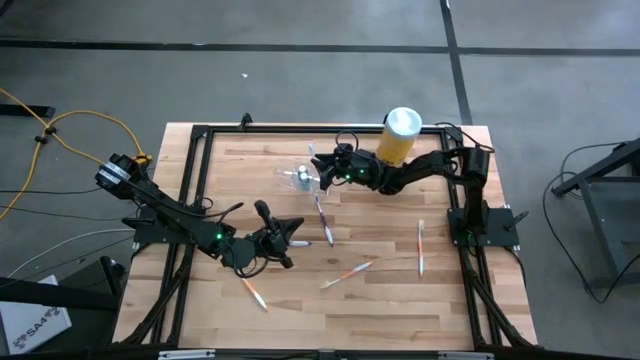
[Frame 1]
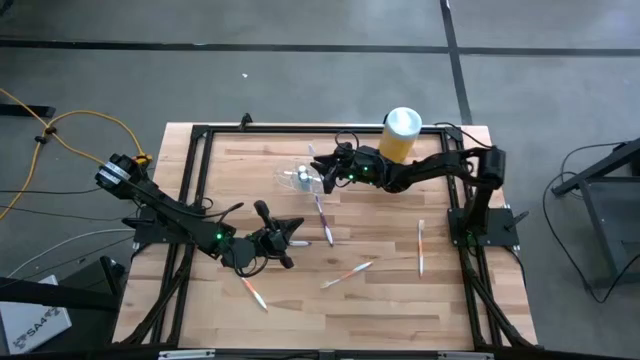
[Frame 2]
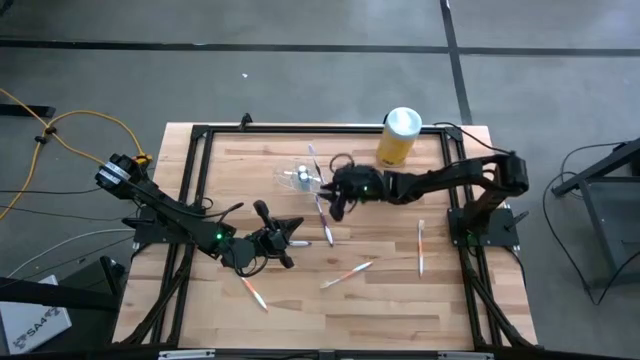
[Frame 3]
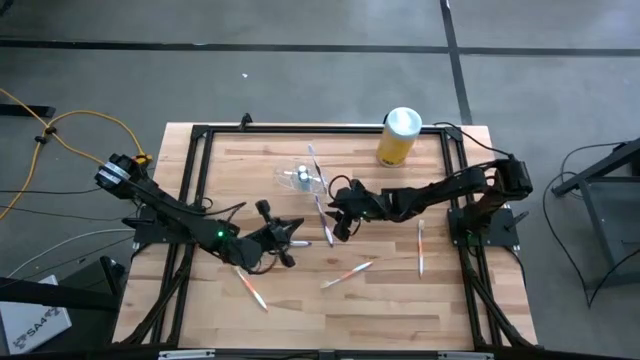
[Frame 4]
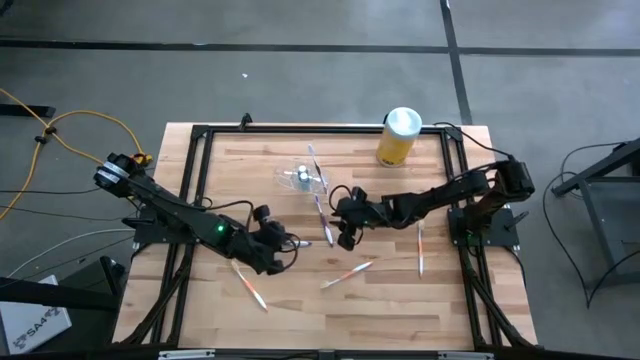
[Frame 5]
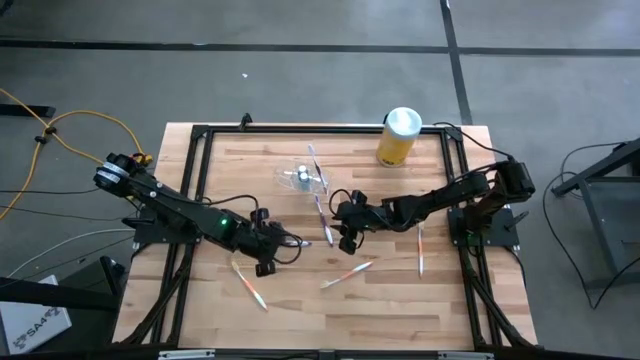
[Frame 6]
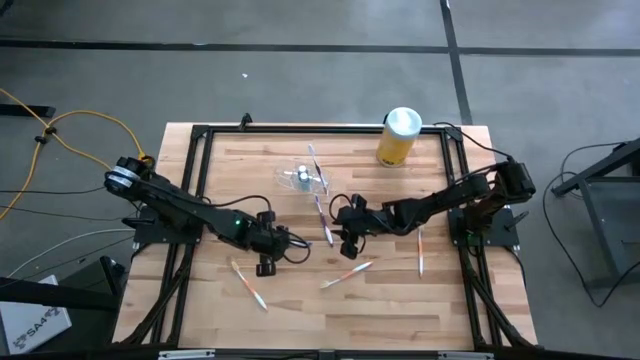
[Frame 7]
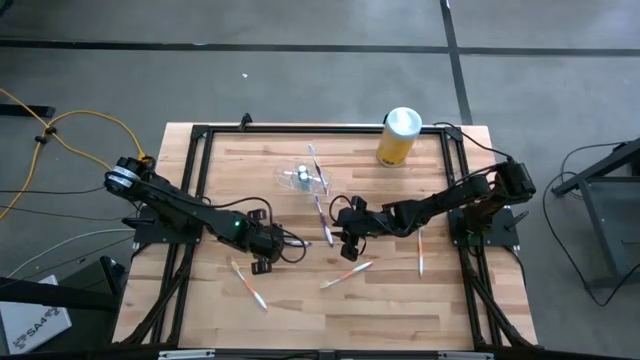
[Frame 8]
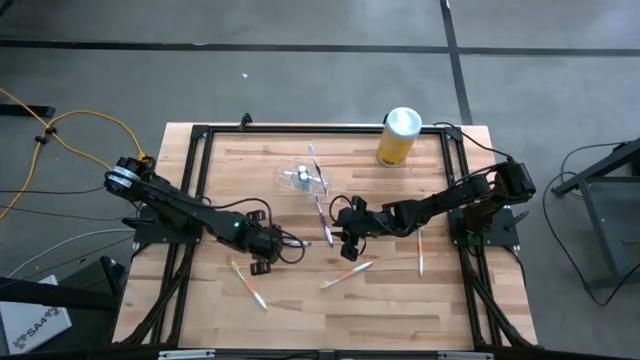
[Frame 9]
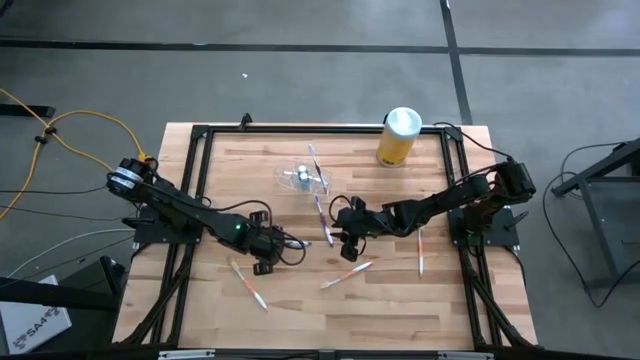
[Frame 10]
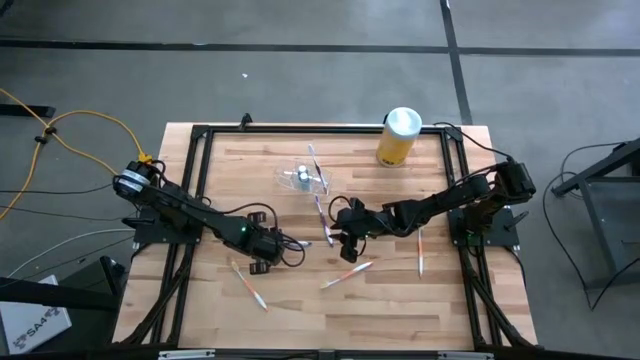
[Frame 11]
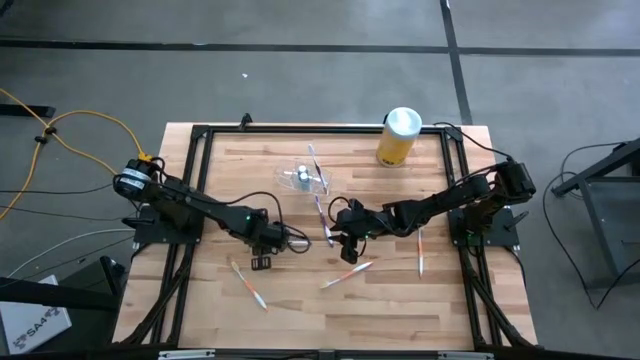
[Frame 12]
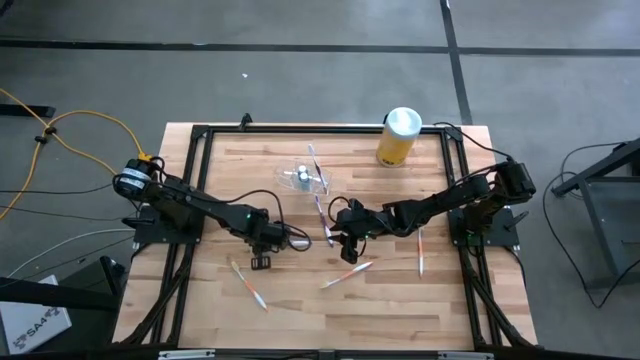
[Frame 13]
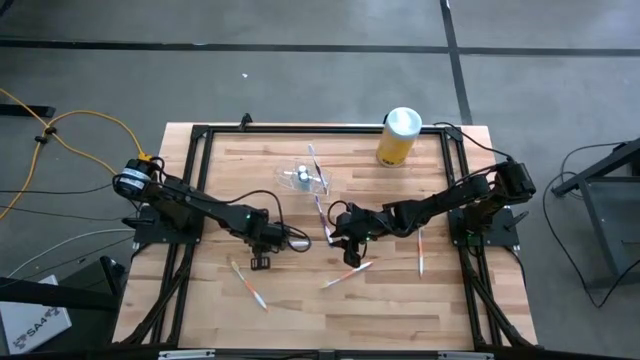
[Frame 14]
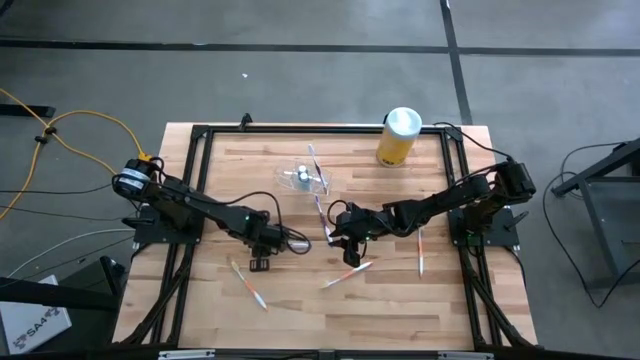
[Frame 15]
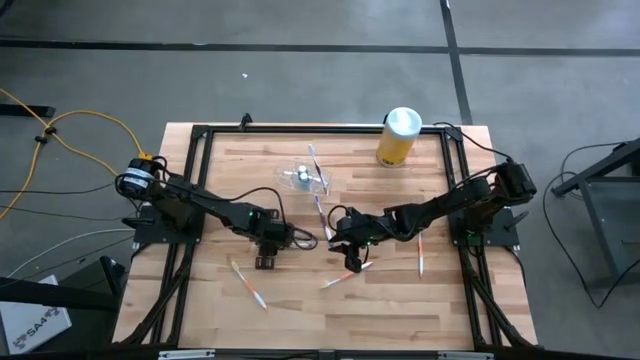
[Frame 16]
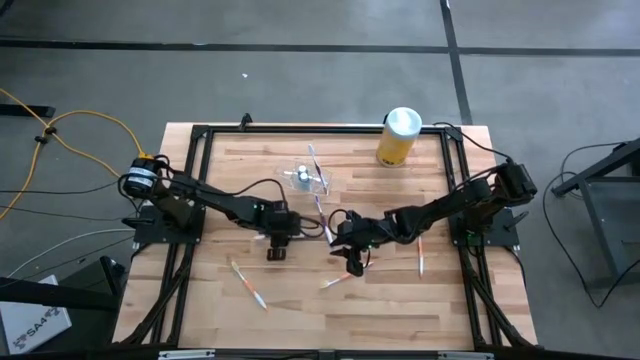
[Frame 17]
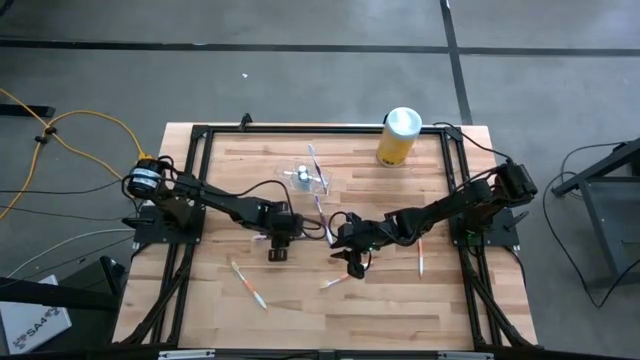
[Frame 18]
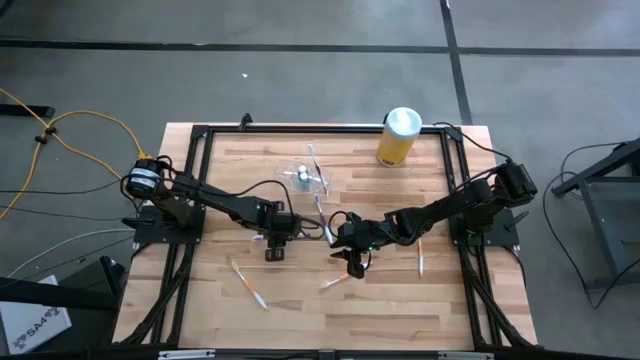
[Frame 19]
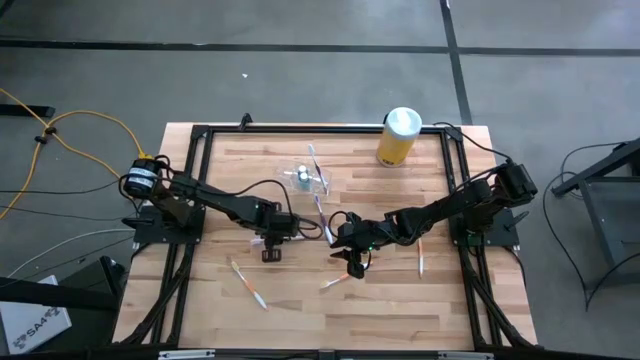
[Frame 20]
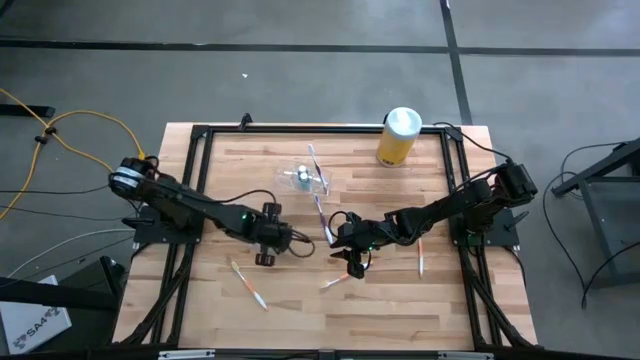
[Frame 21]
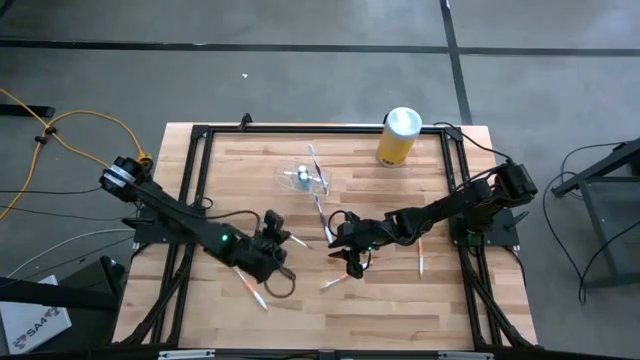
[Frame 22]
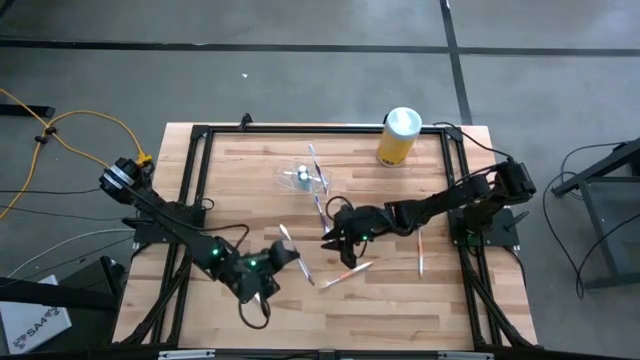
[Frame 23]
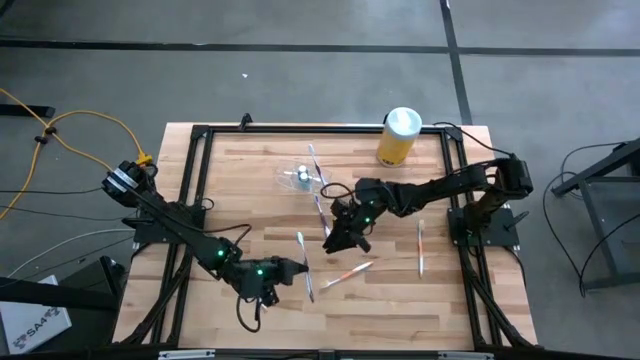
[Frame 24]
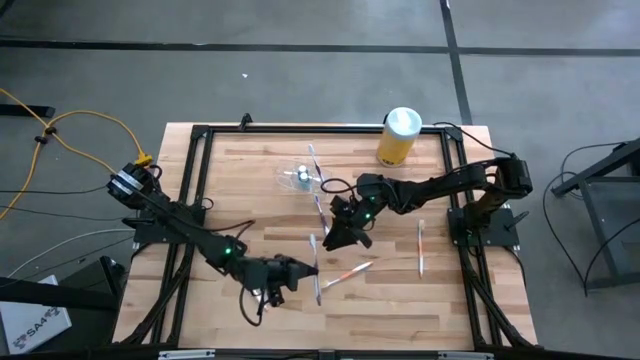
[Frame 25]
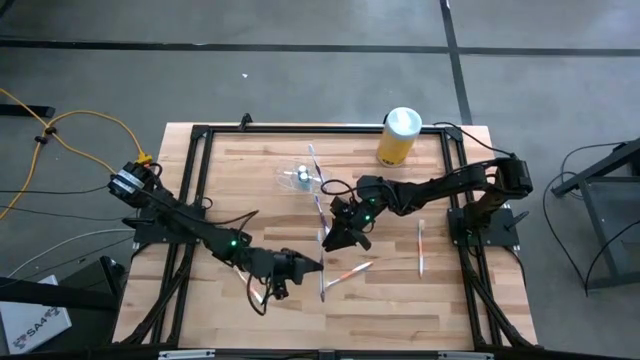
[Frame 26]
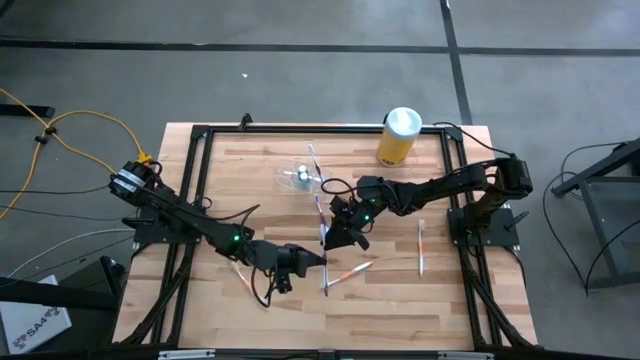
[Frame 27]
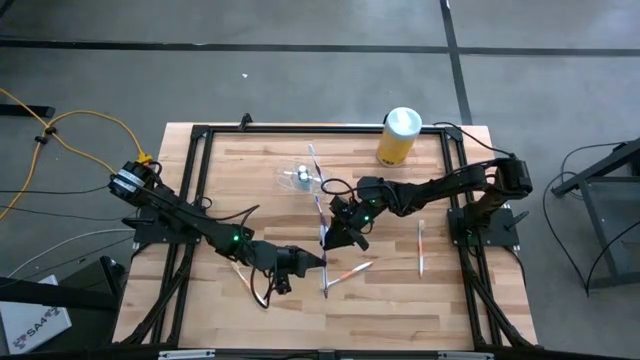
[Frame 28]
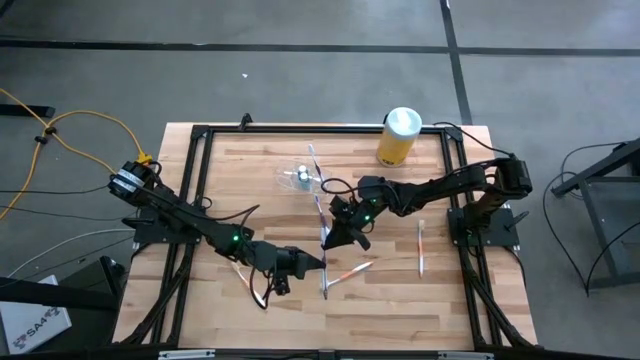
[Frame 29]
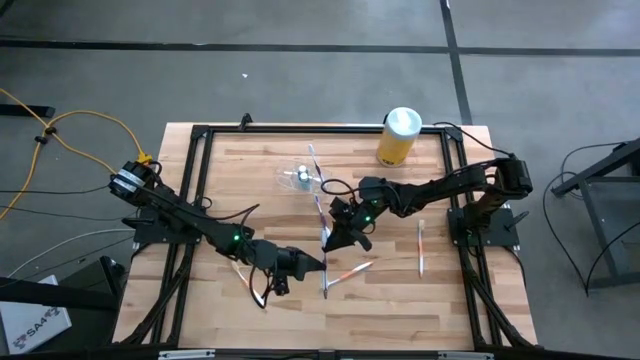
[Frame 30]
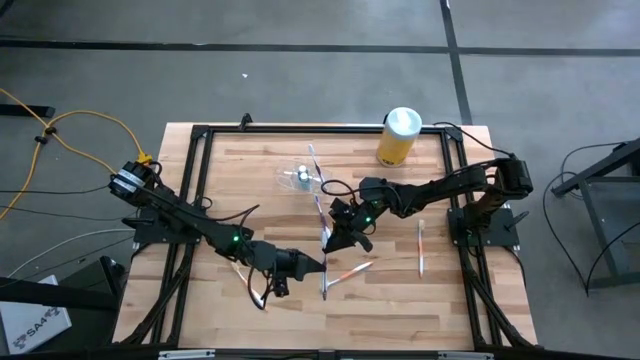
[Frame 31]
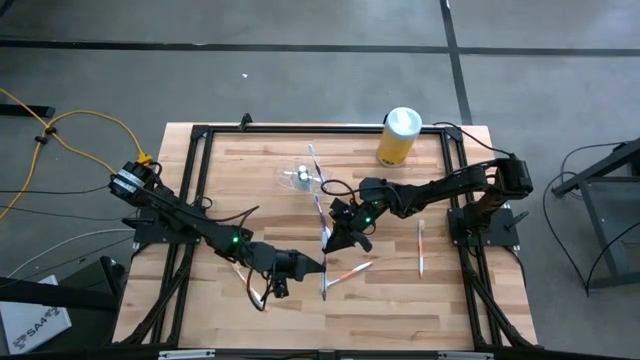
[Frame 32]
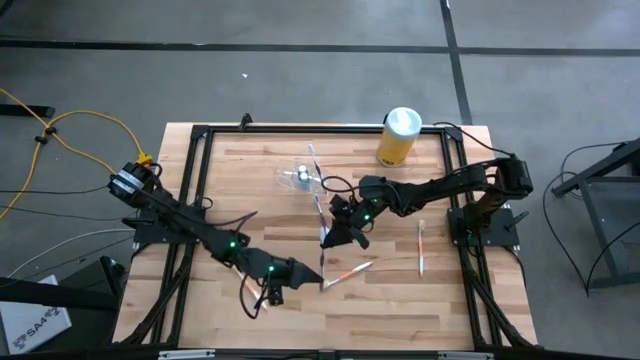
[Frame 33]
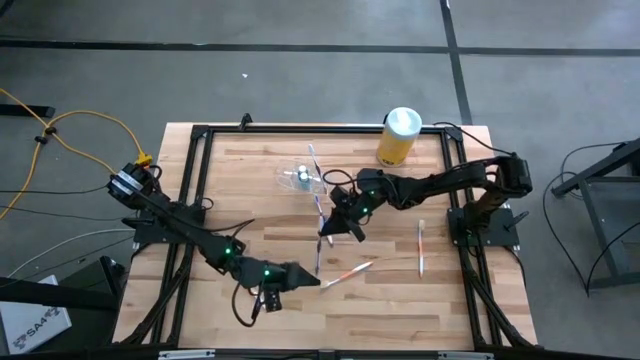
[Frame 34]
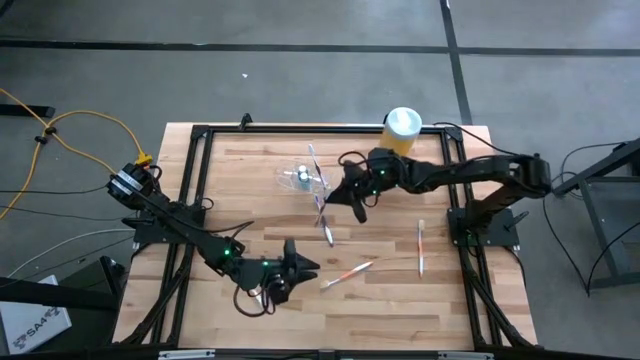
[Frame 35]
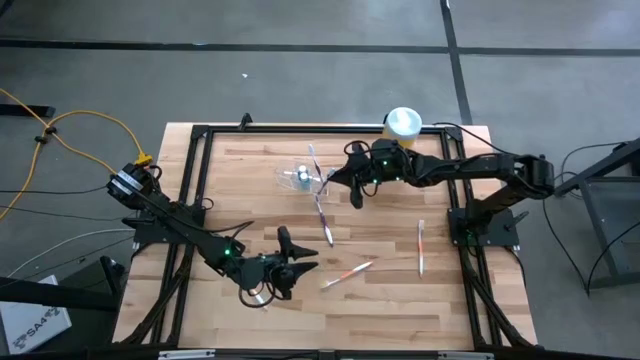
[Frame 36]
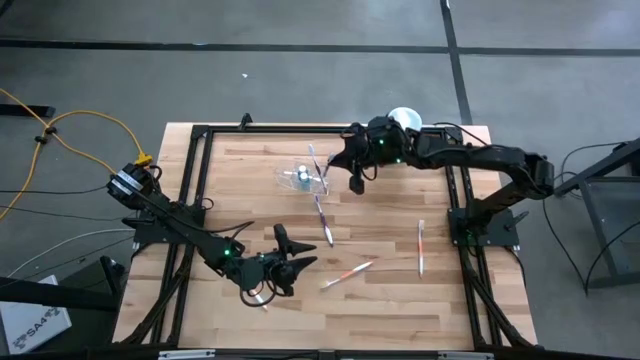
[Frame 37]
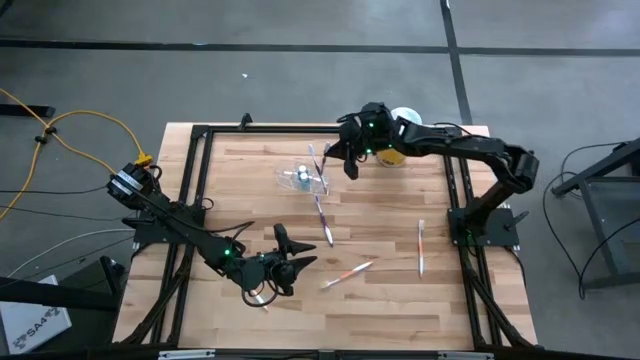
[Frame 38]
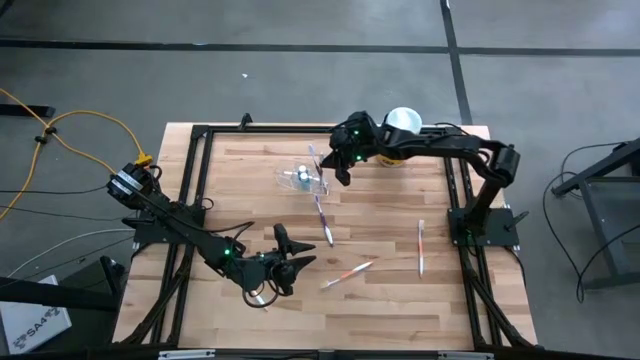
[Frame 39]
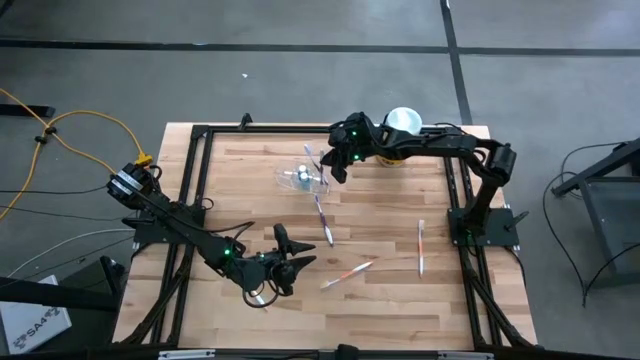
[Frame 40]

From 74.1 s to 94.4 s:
Task: Pick & Place toothbrushing station
Put the left violet toothbrush into the transparent organizer

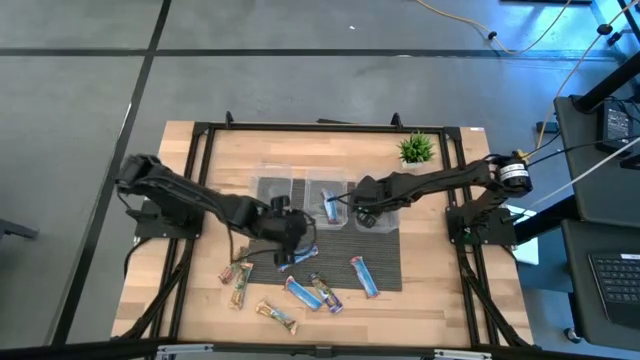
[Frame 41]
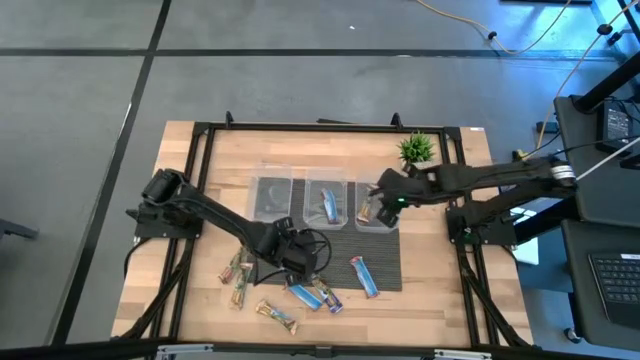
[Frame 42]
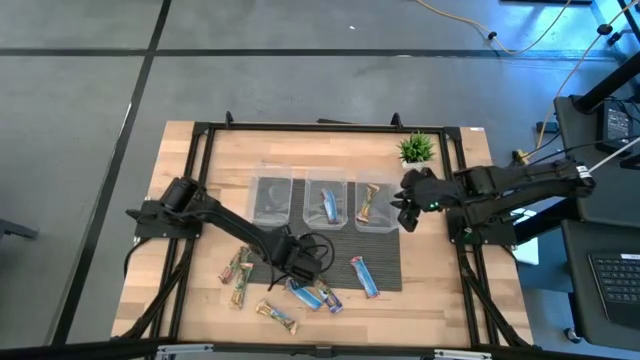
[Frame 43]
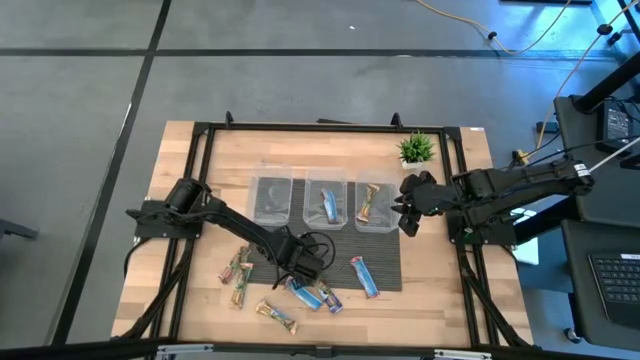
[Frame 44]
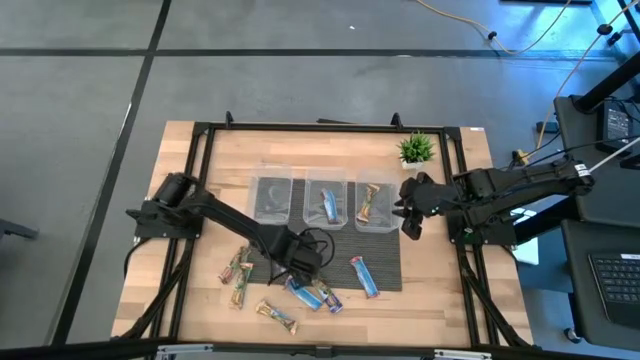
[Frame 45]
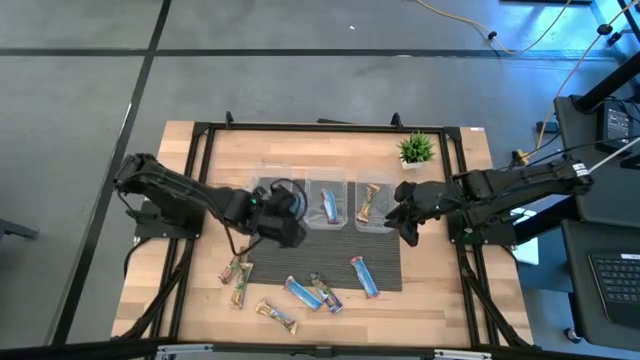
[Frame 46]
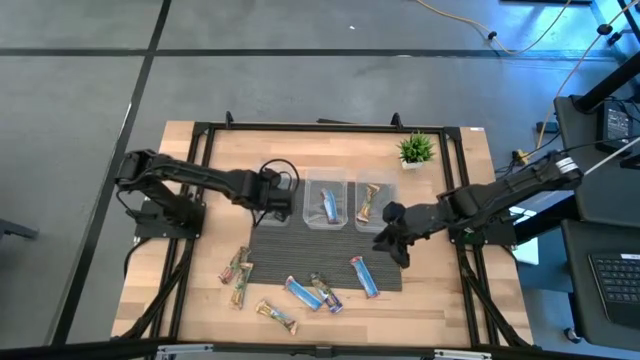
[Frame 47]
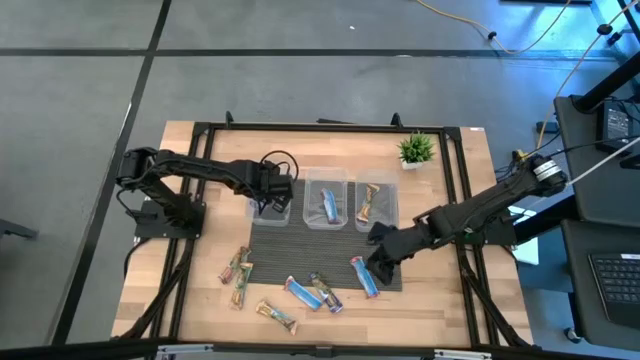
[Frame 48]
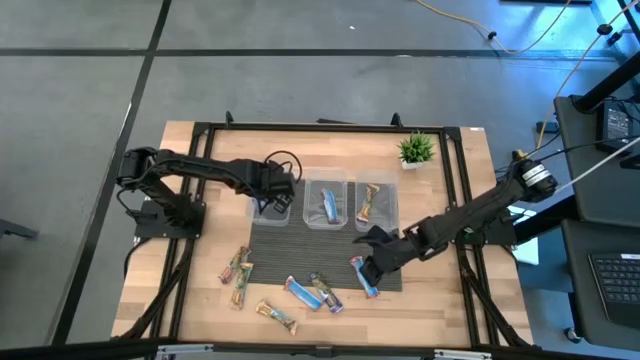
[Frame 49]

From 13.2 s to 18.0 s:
Task: Pick and place Granola Bars by type
Put the blue granola bar into the left transparent bin
